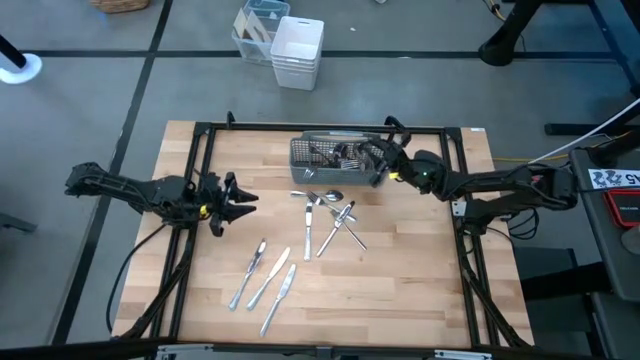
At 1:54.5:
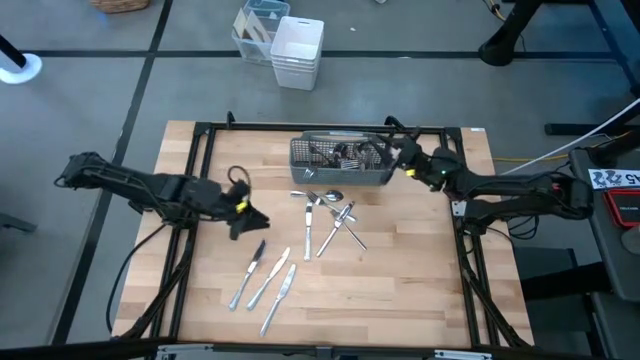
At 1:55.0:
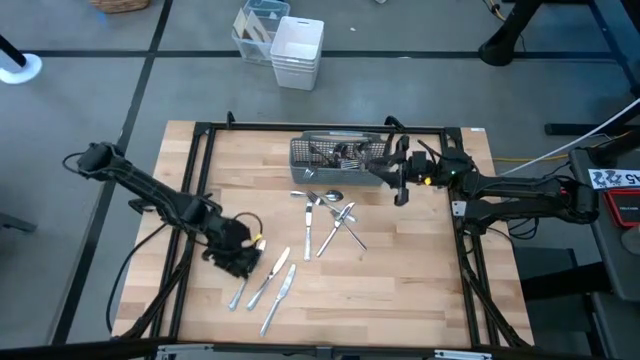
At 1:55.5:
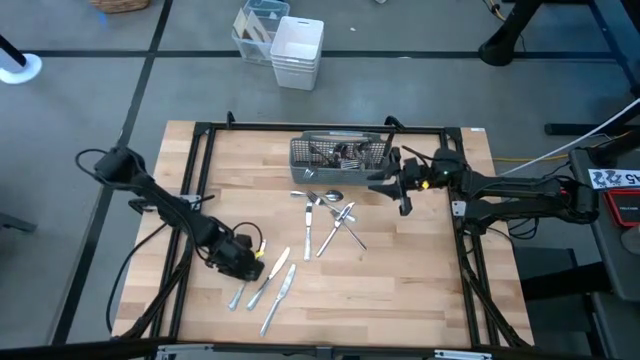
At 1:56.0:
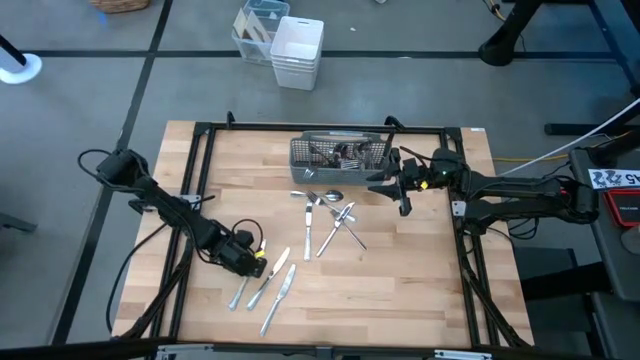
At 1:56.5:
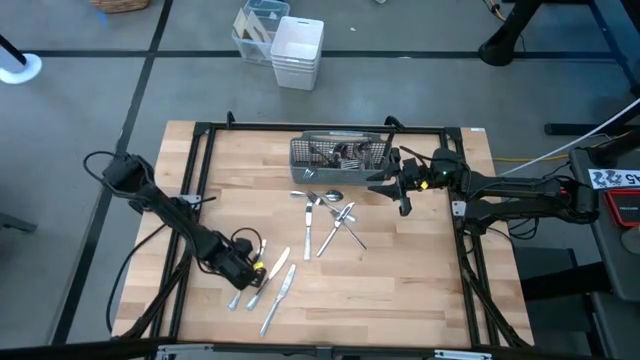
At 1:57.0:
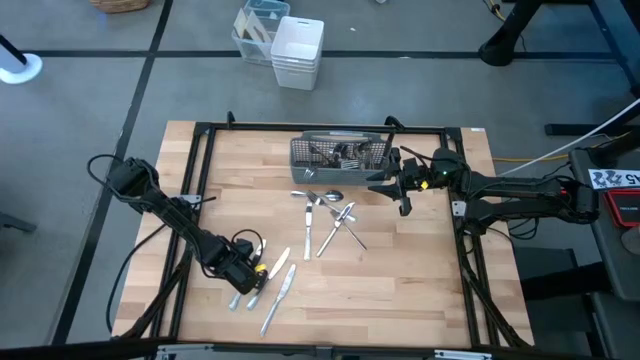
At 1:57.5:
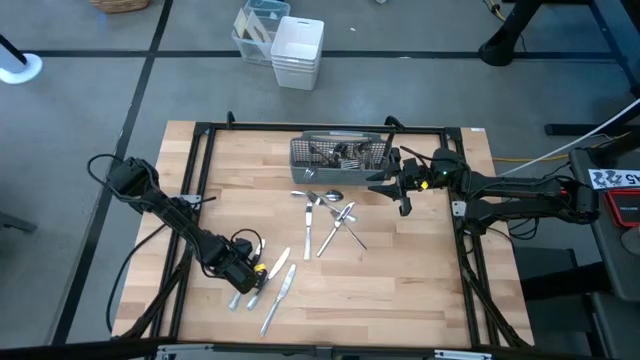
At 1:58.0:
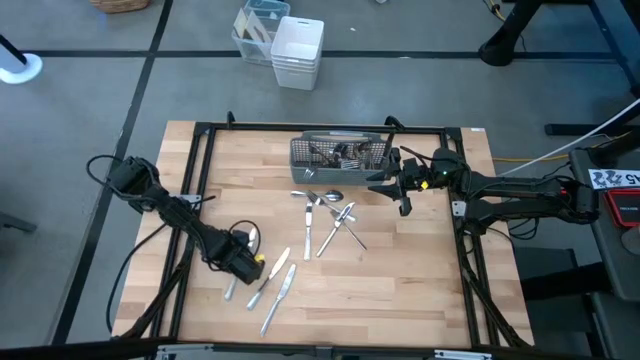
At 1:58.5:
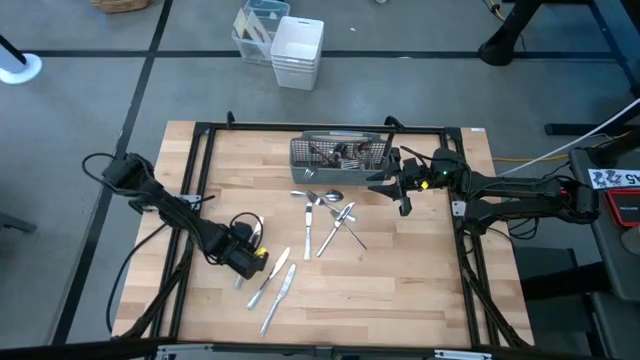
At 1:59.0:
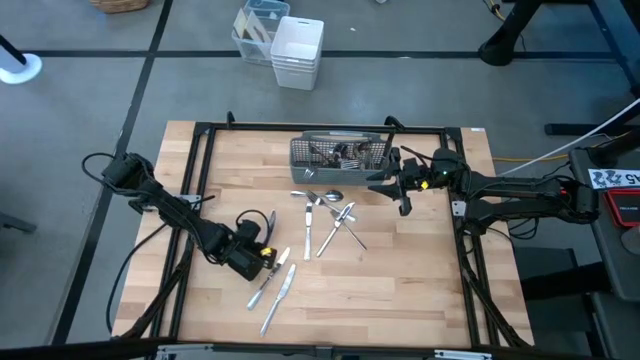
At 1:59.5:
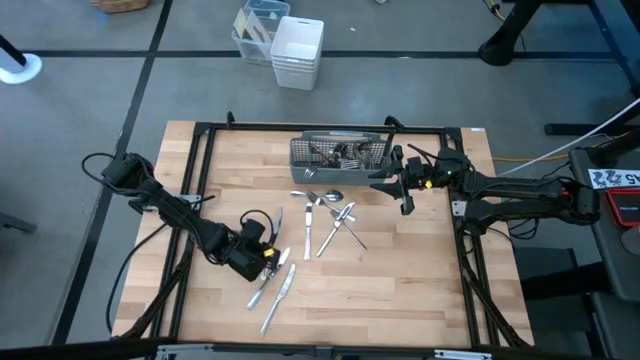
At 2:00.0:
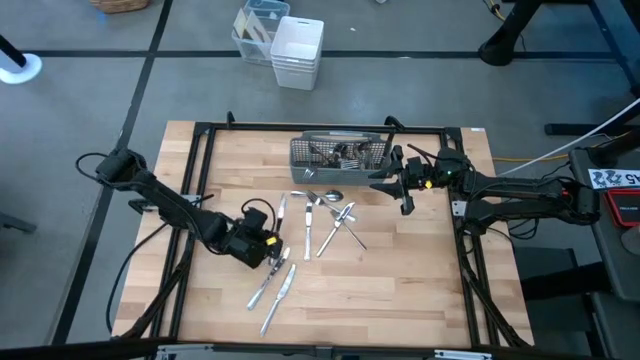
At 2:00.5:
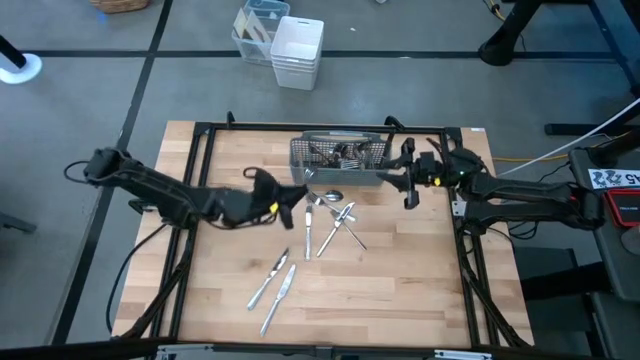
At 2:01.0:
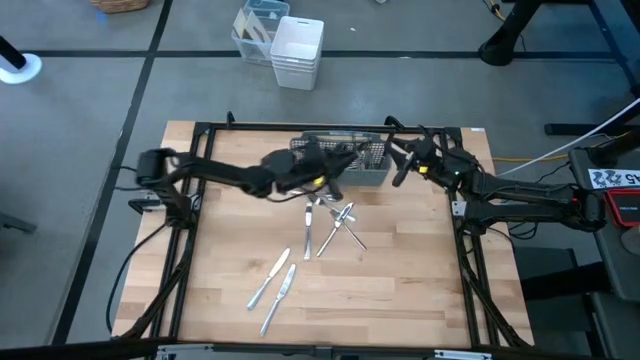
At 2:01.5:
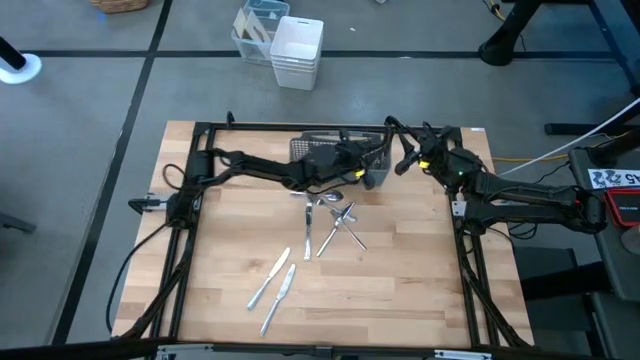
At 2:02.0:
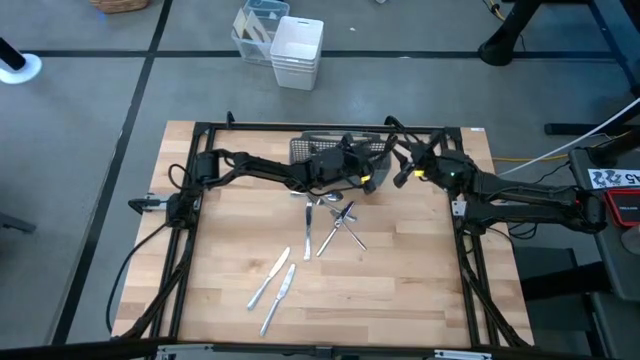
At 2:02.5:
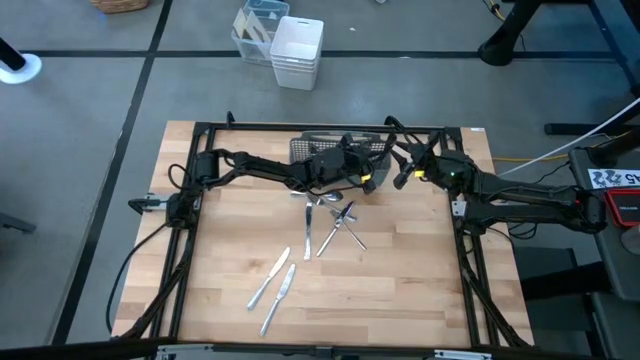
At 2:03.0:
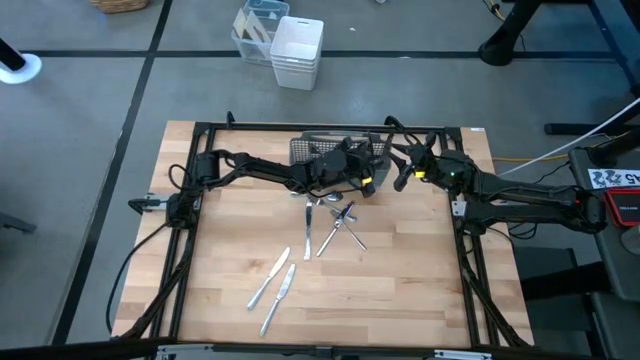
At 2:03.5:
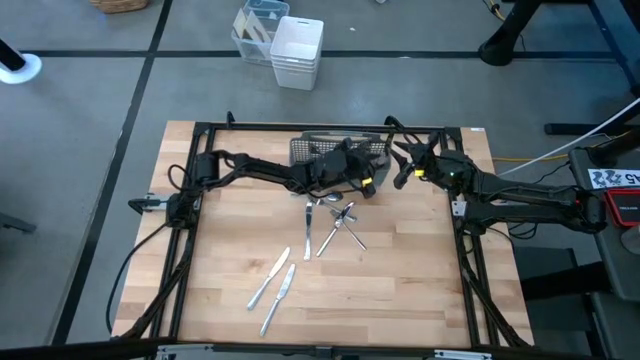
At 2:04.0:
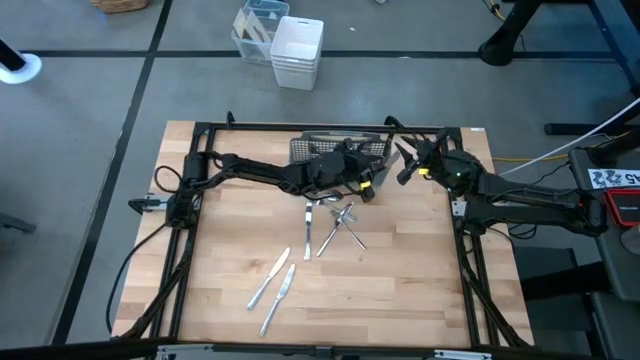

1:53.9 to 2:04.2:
Task: Sort silverware
Put the knife into the silverware rack

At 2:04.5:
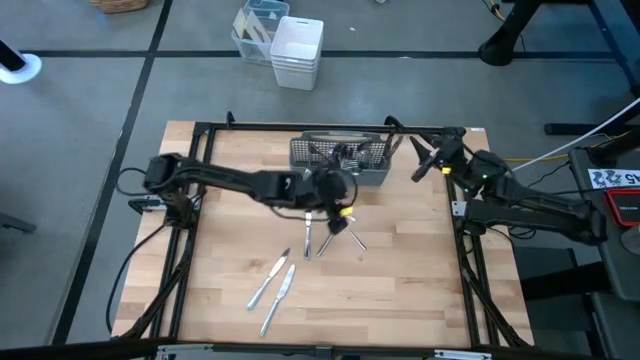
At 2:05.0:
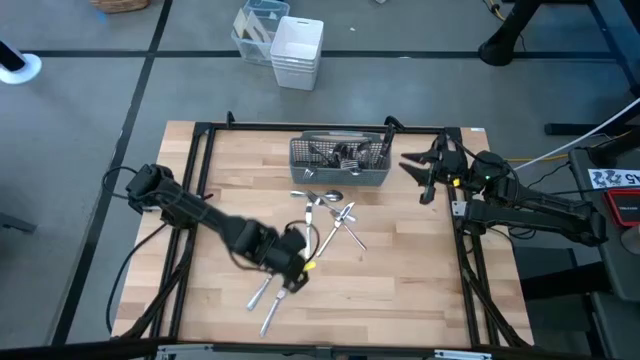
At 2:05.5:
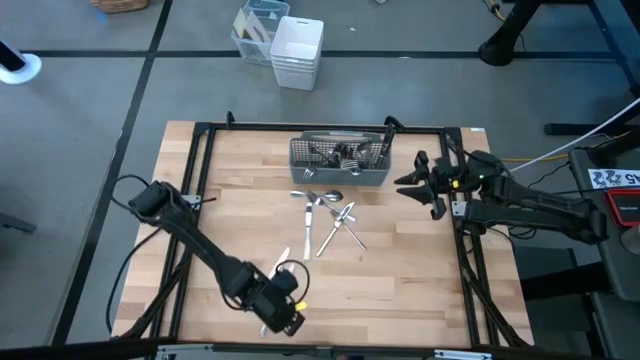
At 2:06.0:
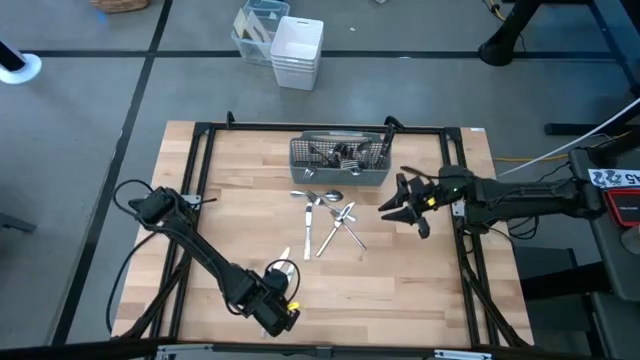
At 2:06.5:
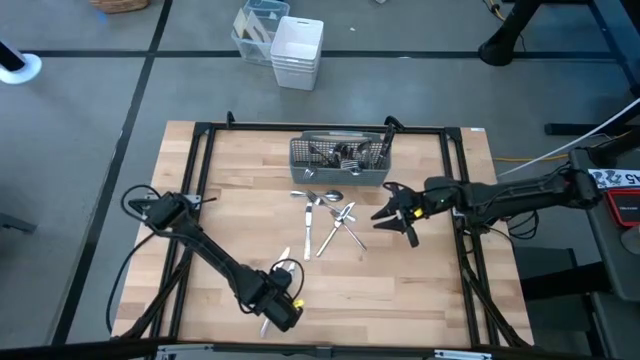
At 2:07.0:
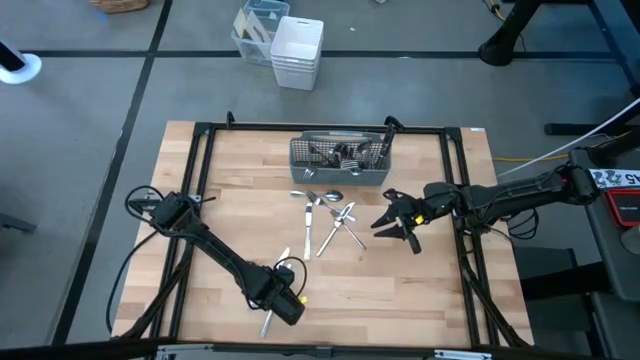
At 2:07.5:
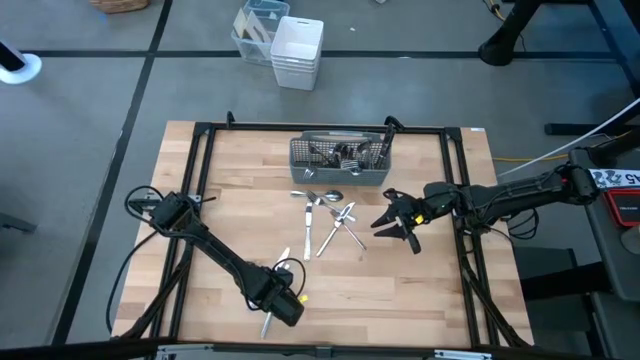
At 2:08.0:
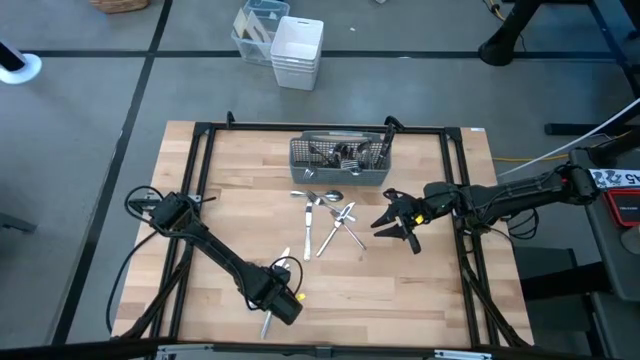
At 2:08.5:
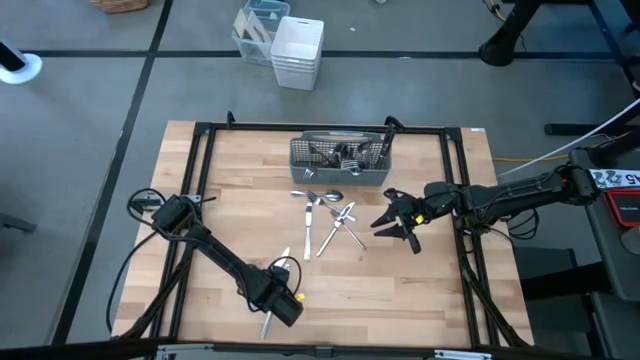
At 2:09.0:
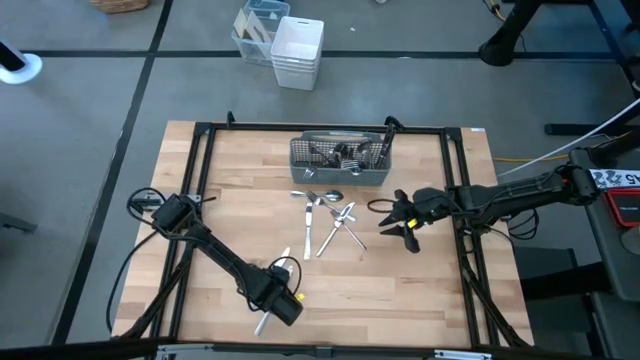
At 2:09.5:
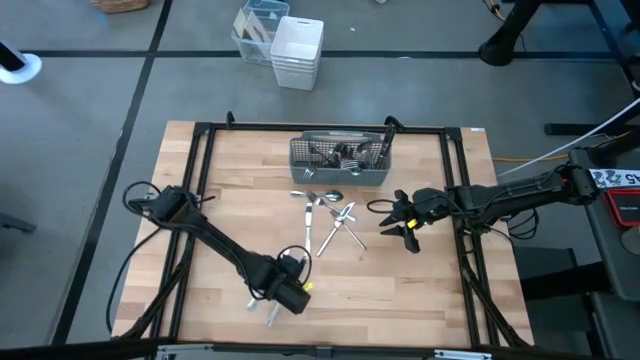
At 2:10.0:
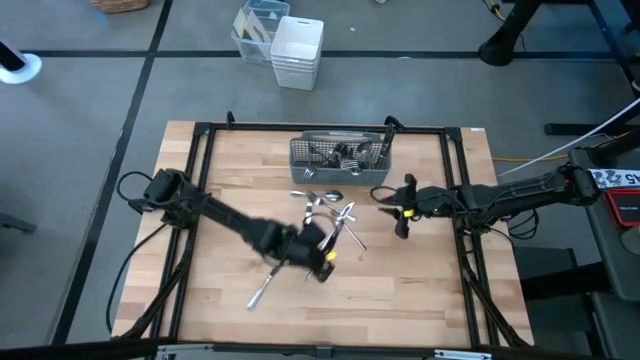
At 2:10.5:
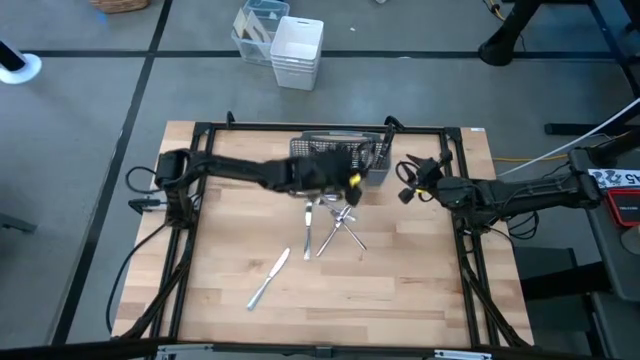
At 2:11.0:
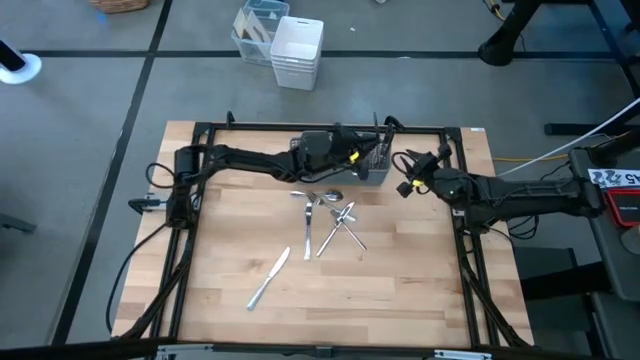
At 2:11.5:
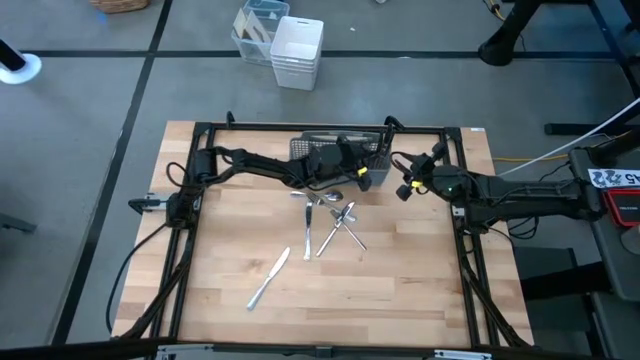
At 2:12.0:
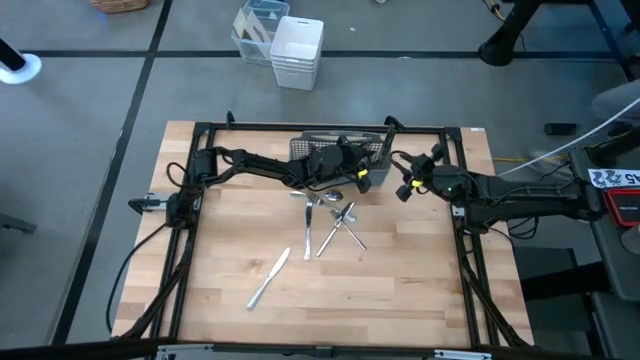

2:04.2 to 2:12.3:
Put the knife into the silverware rack

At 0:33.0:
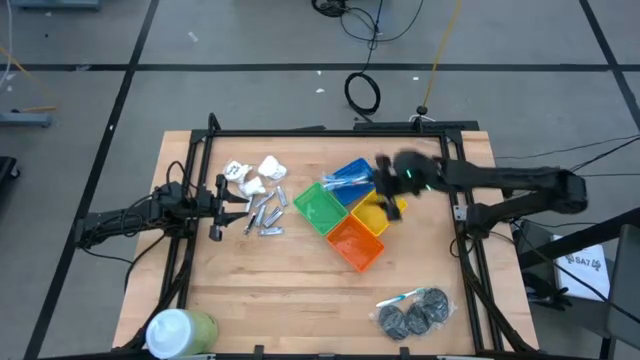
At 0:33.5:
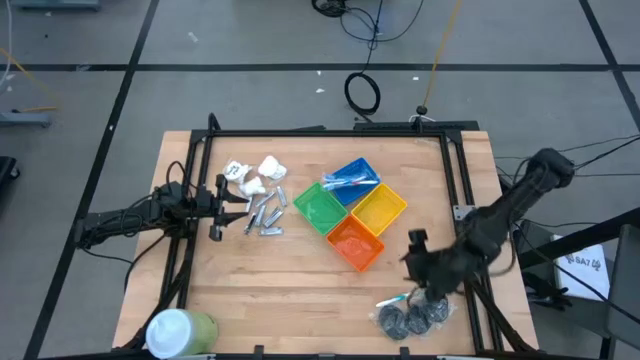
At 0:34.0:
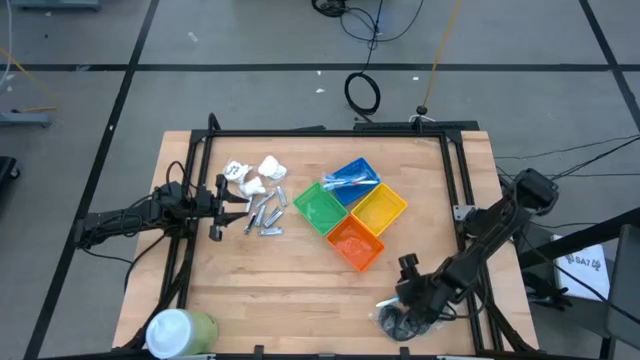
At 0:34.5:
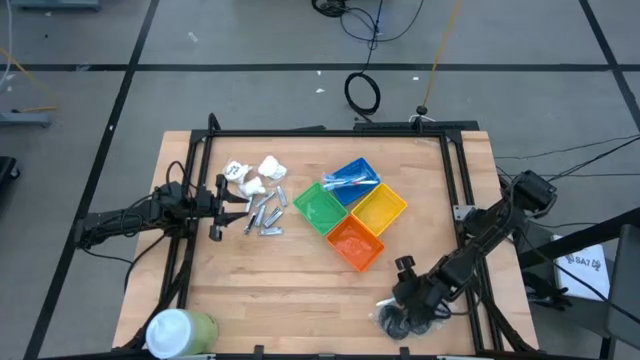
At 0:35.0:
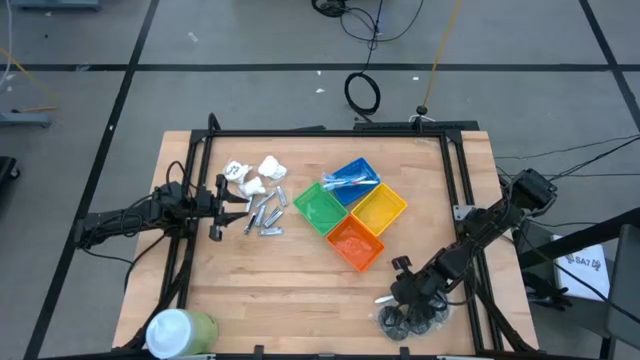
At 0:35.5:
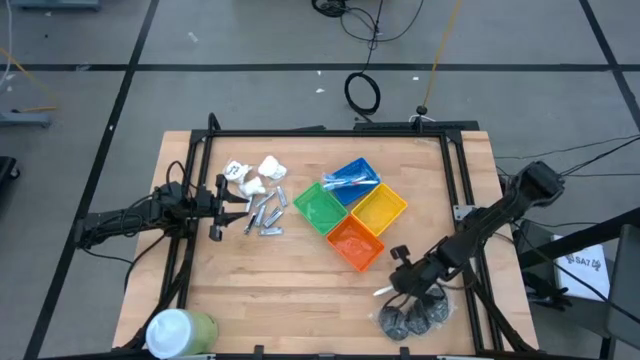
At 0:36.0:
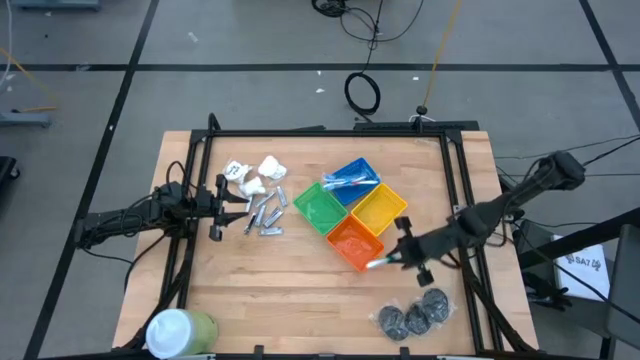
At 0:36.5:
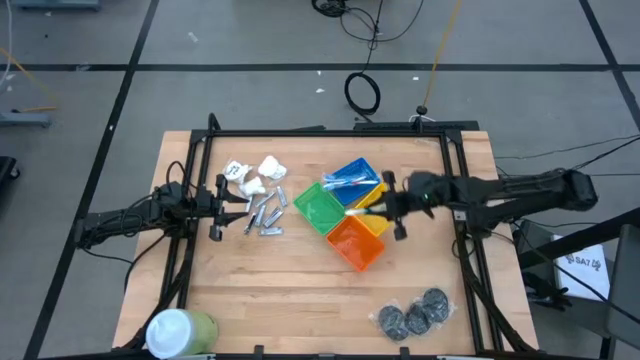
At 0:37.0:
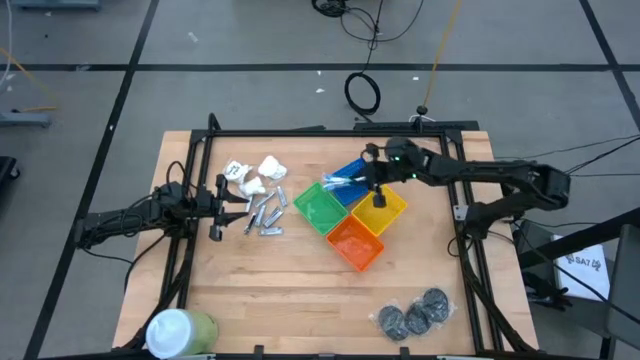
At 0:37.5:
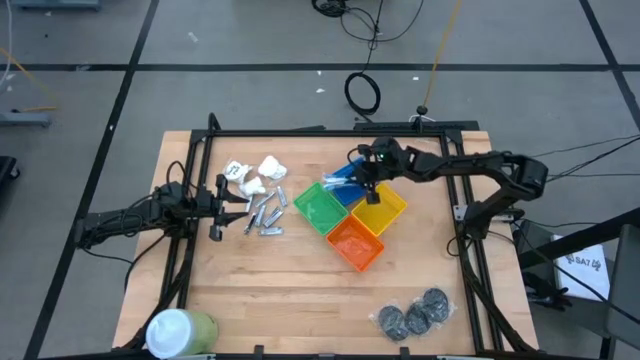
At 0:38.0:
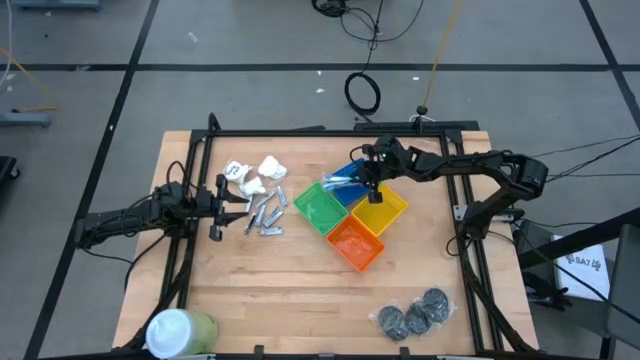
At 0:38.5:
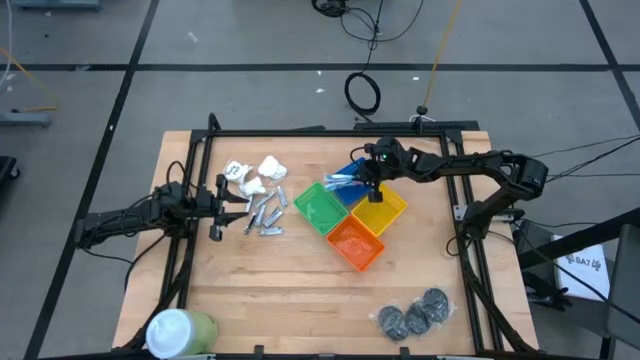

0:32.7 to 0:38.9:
Task: Pick & Place Travel size toiletries
Put the green toothbrush into the blue bin
